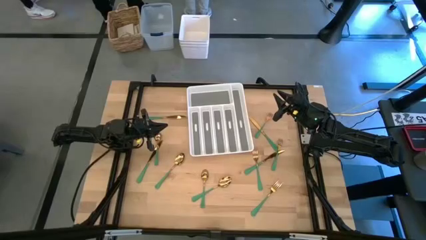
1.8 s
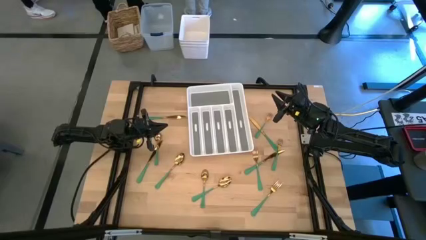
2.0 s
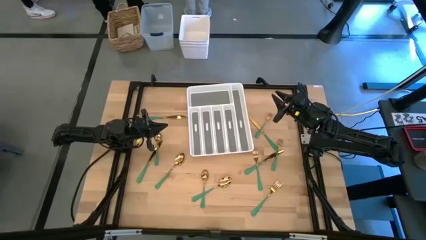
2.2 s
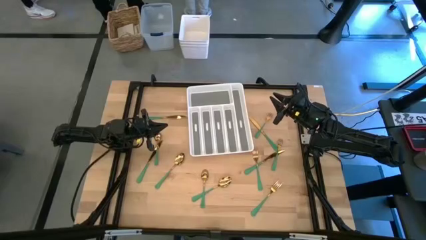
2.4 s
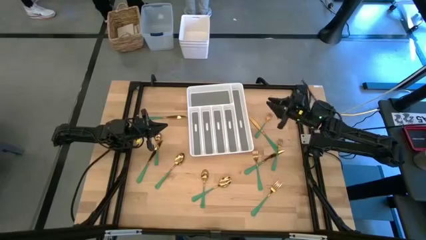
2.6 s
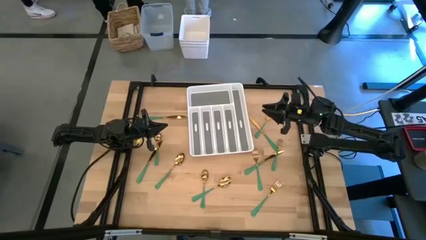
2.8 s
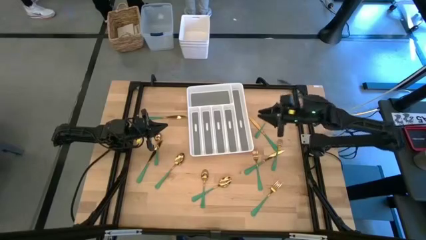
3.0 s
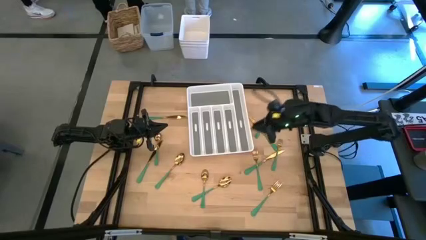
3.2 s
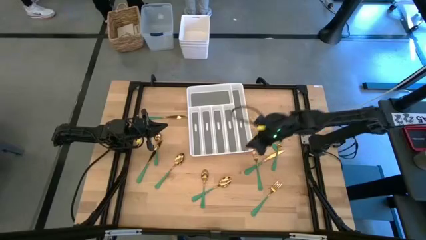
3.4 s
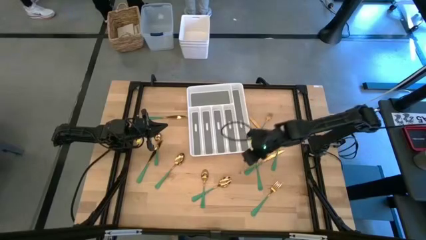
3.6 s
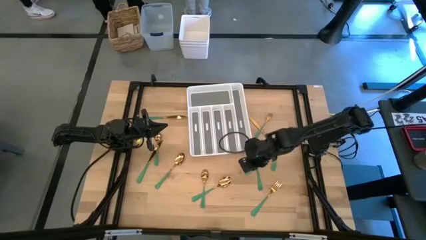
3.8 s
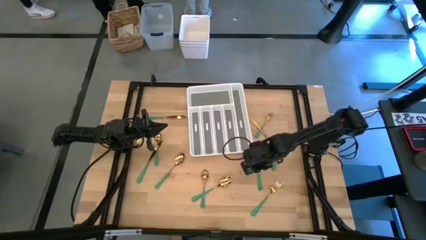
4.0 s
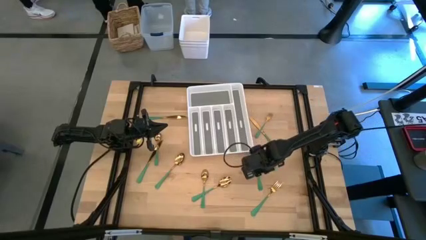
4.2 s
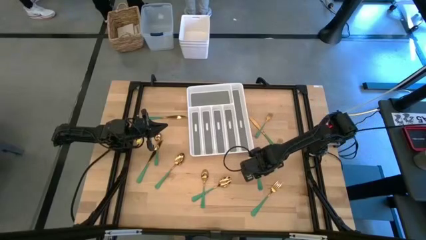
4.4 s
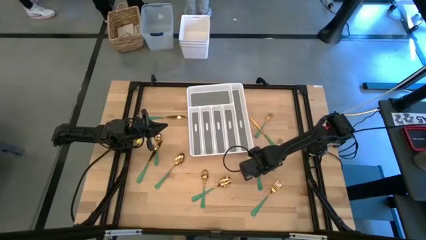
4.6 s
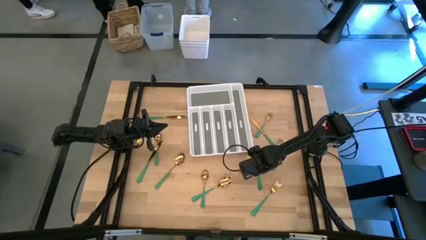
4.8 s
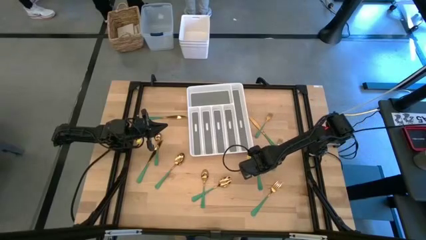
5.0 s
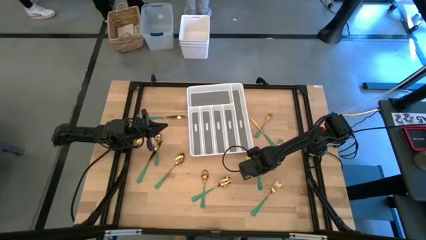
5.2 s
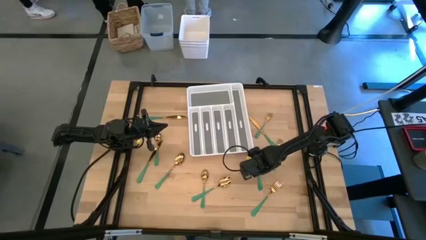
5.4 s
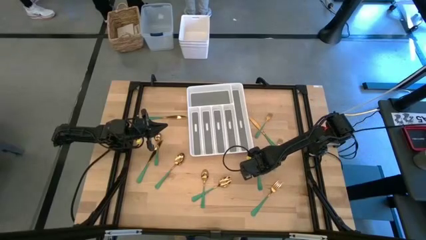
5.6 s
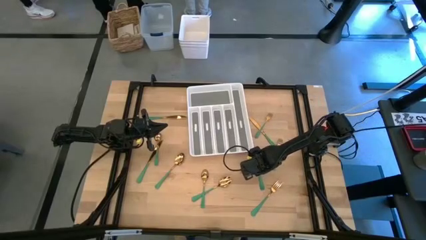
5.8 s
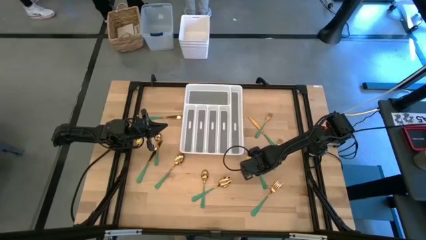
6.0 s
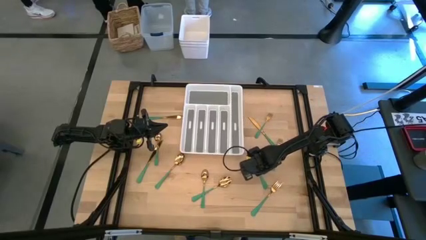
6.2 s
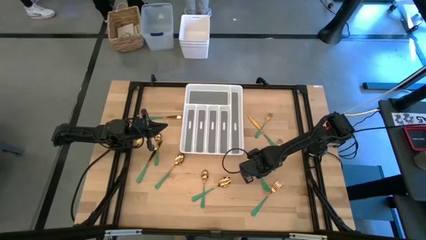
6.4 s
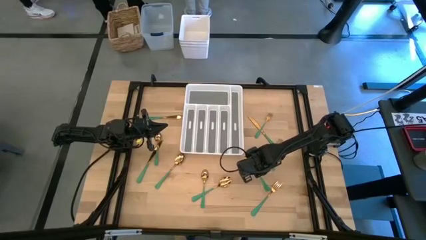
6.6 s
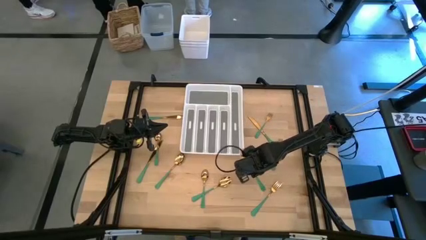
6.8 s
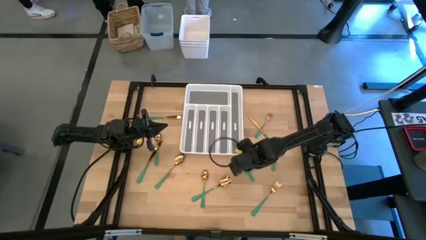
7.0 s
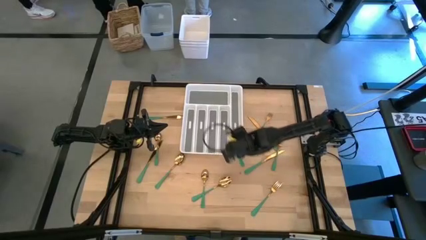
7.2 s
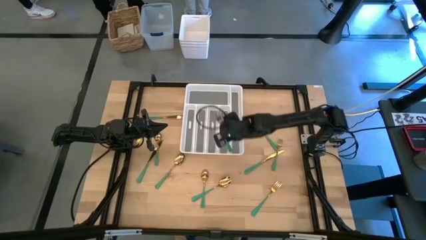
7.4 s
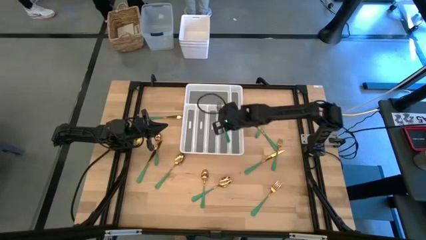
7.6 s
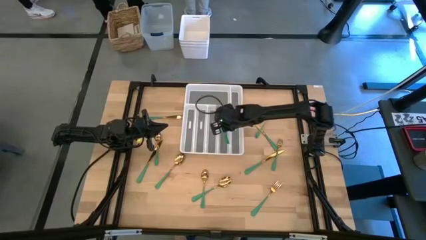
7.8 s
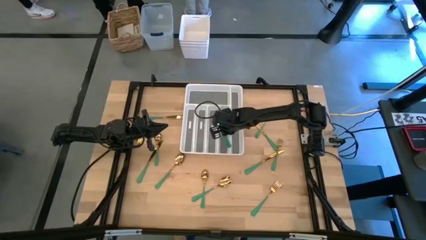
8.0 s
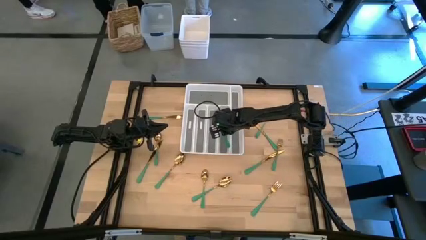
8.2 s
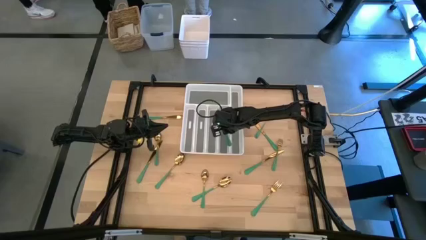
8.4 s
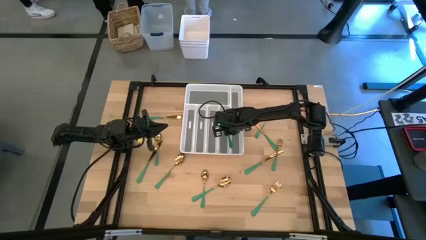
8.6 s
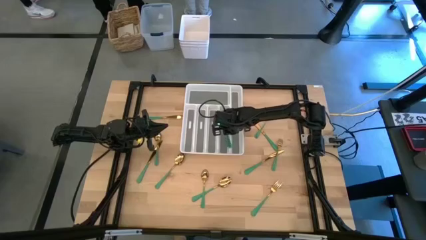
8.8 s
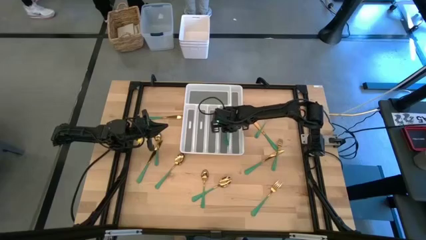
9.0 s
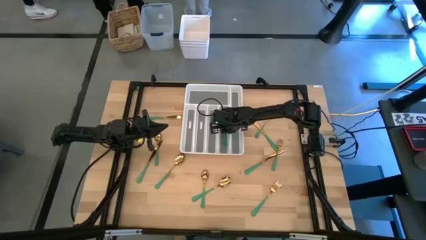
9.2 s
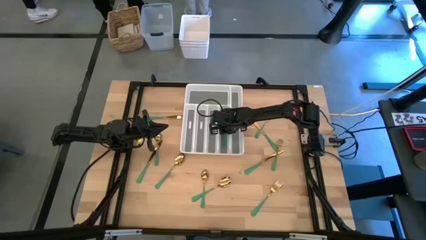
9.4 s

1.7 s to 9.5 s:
Task: Sort silverware
Put the middle left fork into the silverware organizer

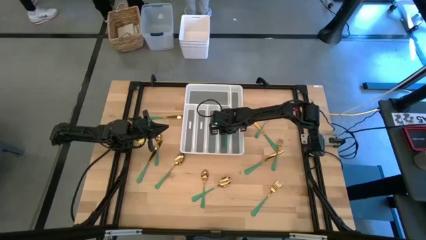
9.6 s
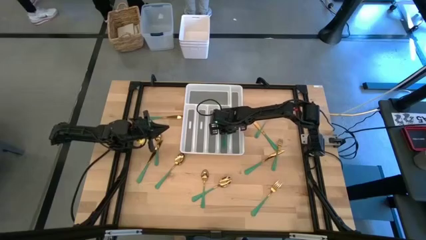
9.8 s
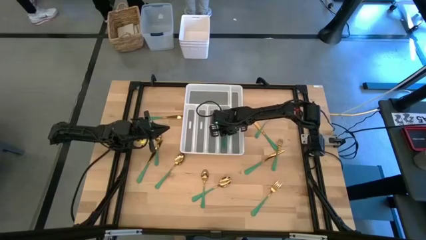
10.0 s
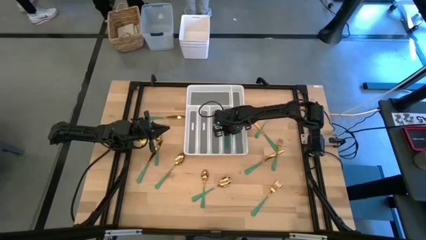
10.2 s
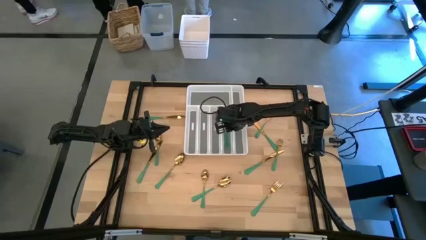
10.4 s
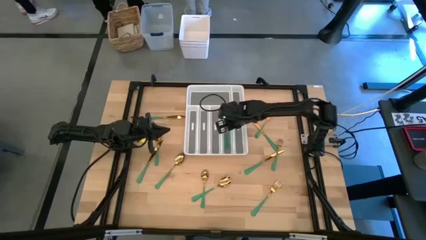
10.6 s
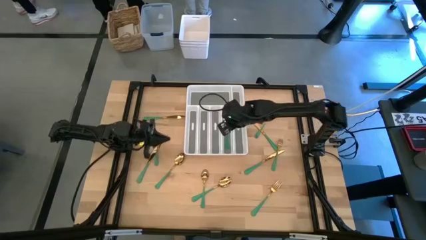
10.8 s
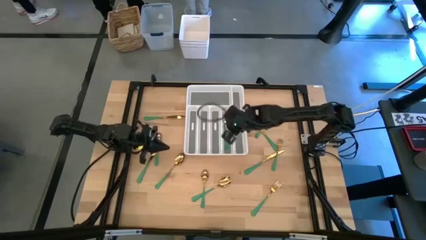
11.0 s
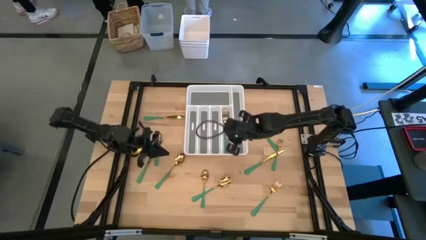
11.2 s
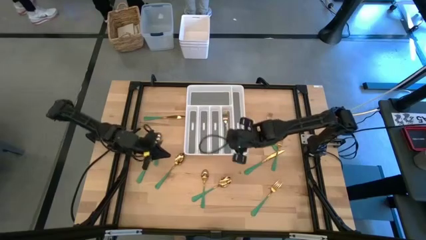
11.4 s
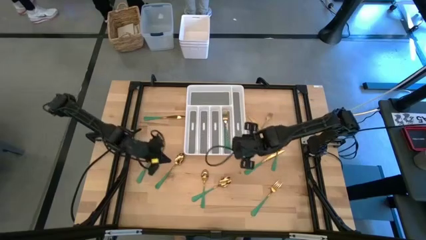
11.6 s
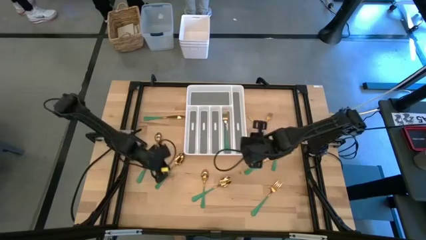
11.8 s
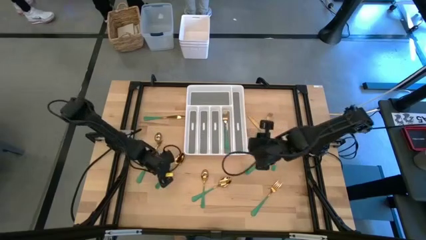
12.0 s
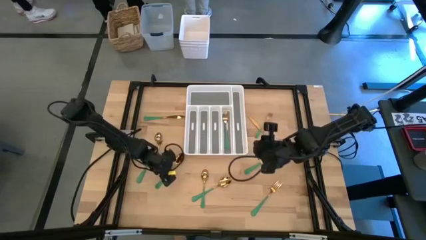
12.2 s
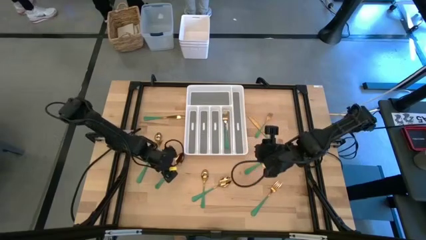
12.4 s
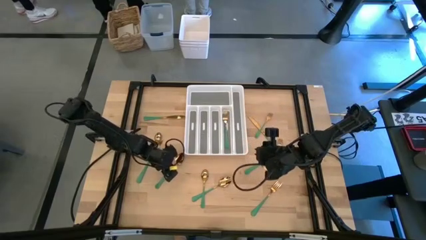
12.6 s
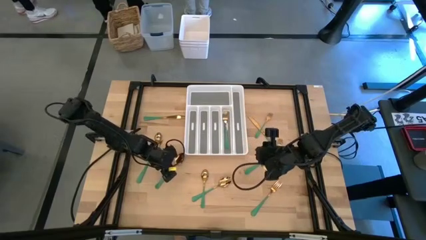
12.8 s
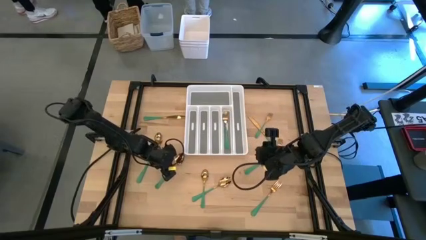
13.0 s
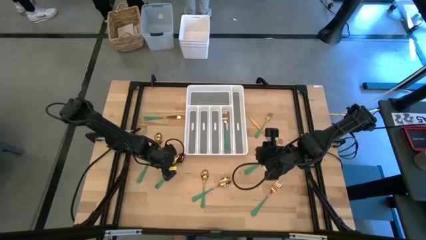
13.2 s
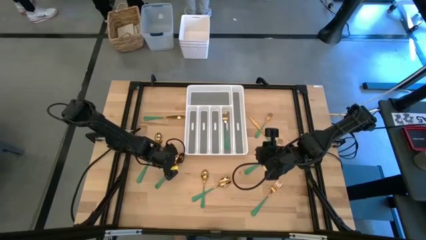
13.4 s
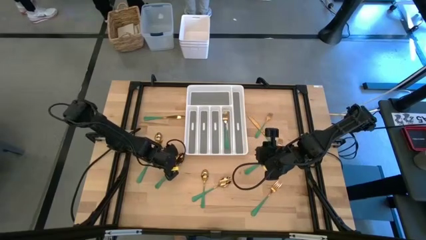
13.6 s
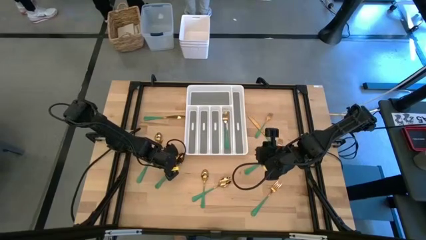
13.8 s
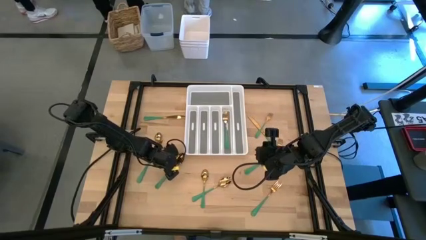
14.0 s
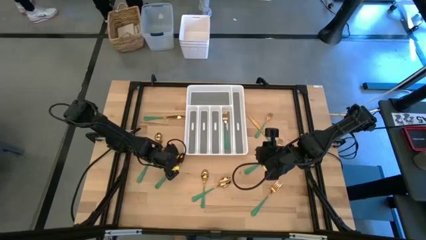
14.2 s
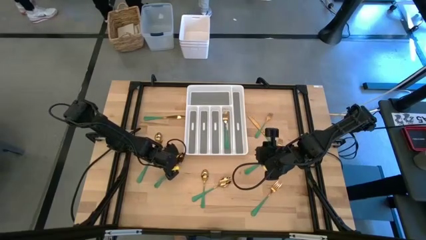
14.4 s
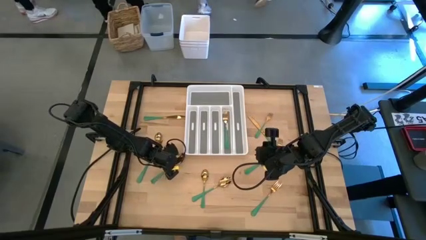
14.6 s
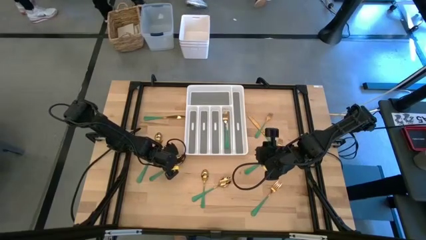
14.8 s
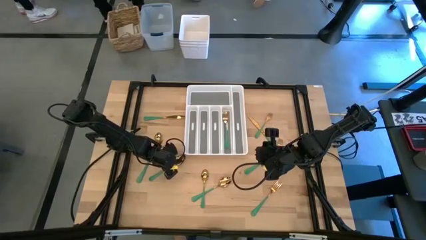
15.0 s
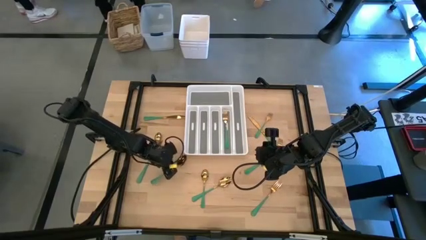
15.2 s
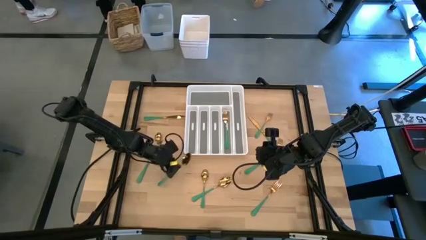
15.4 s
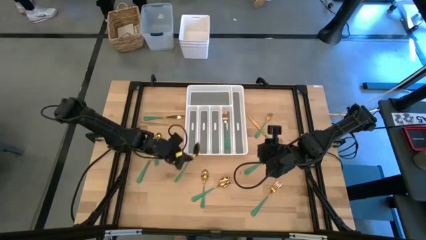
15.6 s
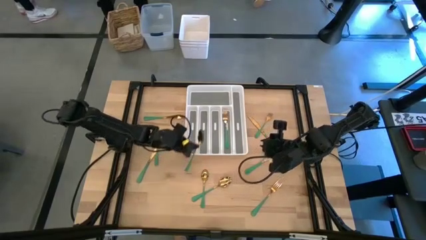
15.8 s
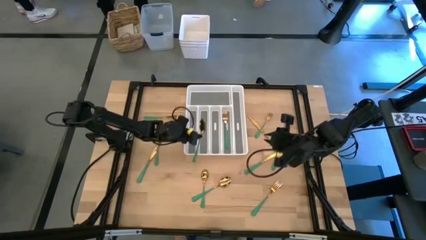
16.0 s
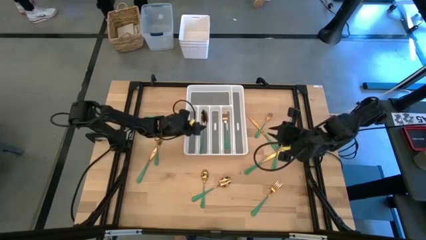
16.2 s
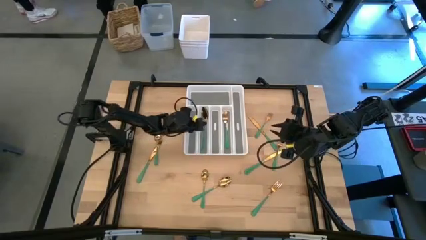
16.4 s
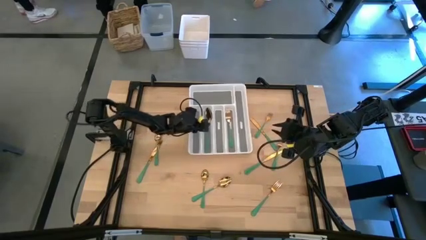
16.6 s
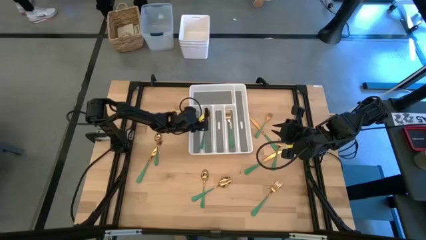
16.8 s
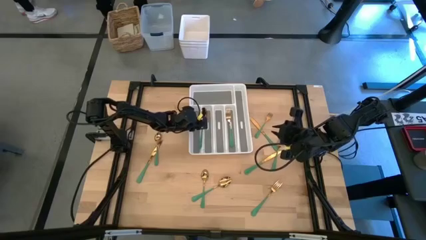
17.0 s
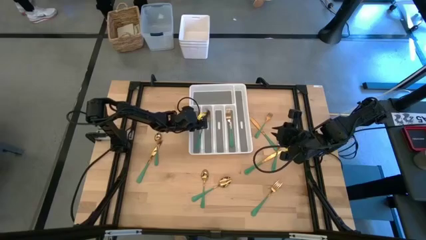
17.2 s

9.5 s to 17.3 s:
Put the middle left side spoon into the silverware organizer

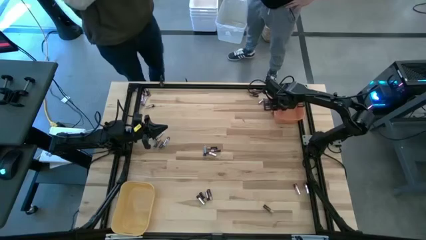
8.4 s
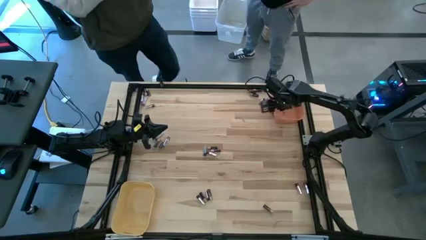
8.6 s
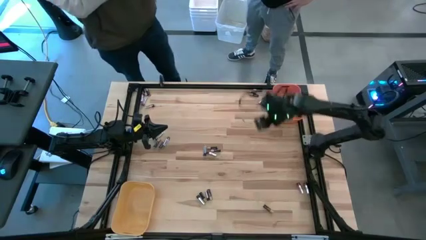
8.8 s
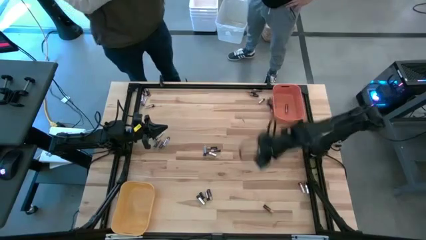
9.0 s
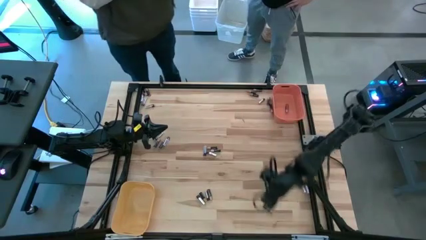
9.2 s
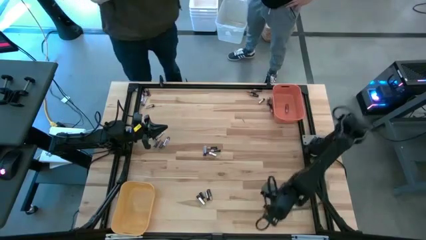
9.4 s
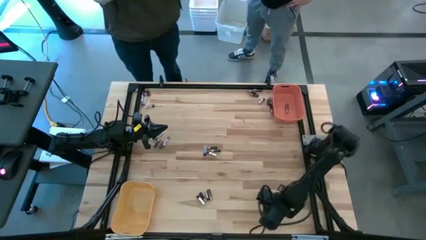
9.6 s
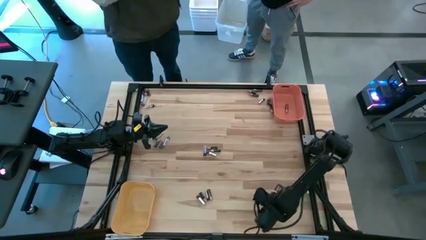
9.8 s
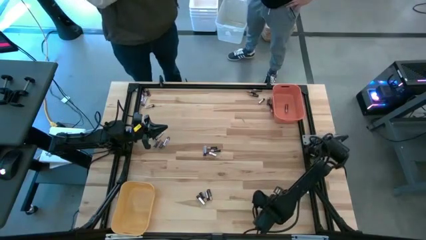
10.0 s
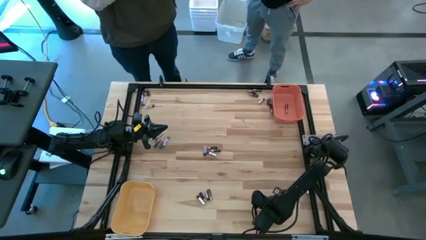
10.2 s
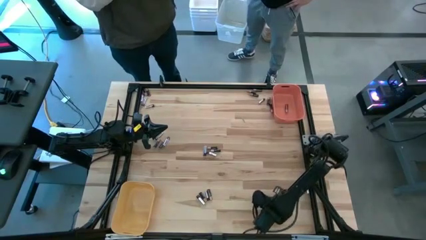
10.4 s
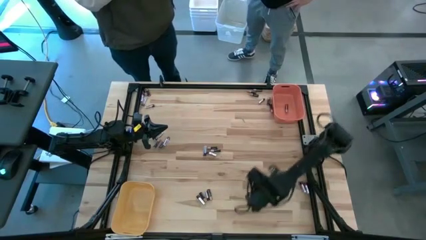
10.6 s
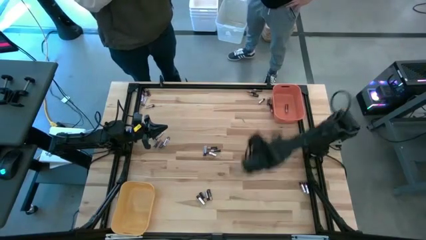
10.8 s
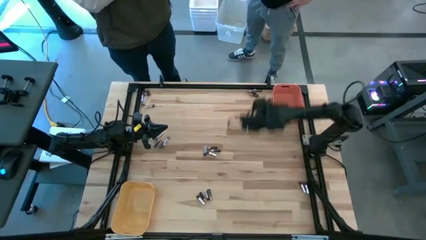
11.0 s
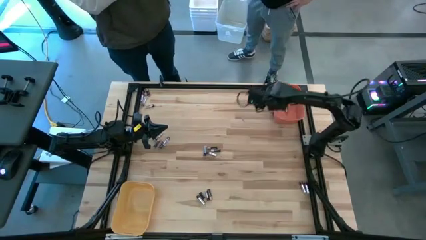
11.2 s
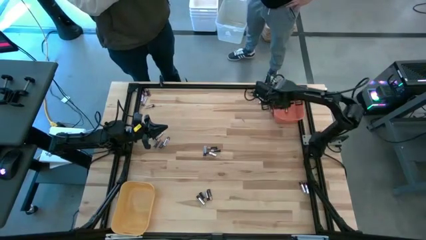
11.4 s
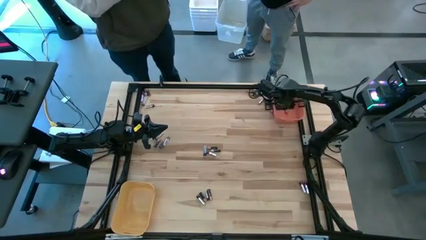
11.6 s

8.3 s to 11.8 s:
Task: Sort batteries
Put the black battery into the orange bin
